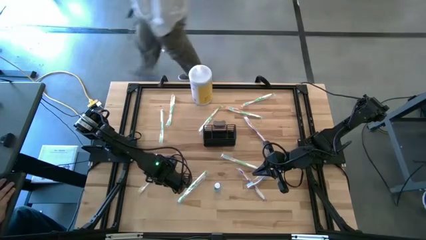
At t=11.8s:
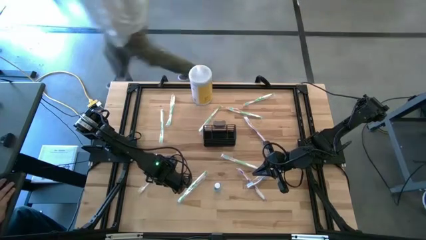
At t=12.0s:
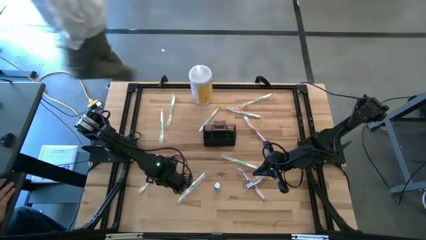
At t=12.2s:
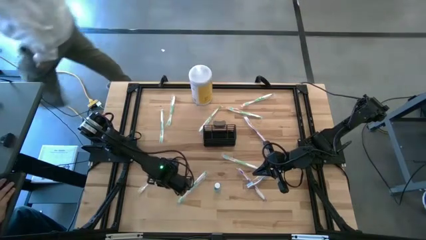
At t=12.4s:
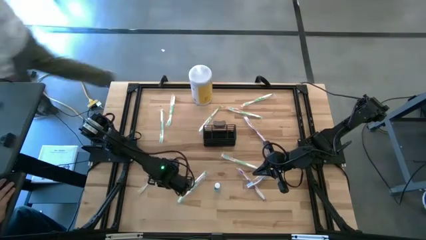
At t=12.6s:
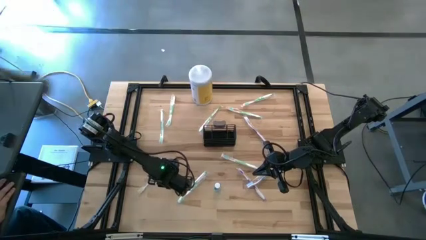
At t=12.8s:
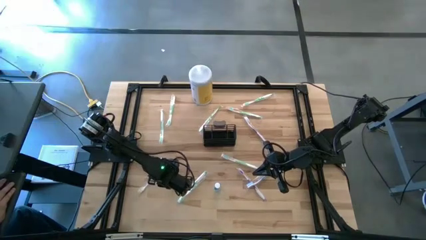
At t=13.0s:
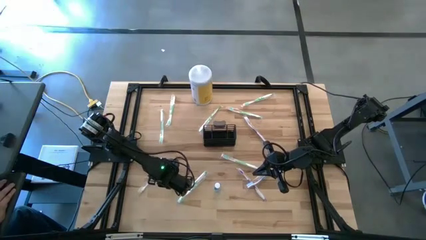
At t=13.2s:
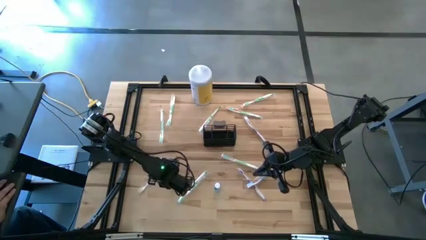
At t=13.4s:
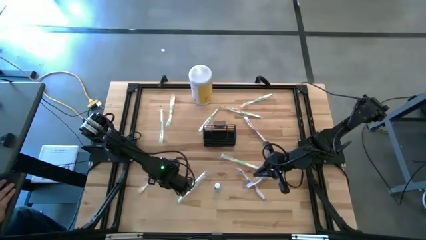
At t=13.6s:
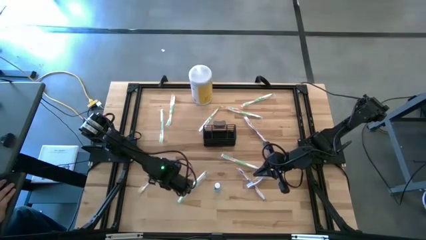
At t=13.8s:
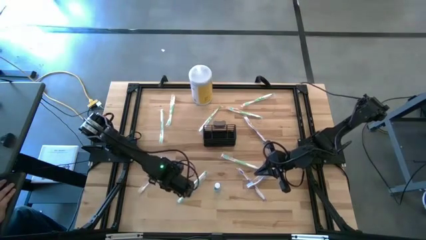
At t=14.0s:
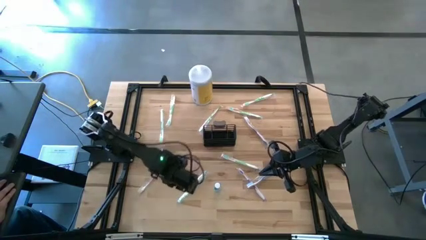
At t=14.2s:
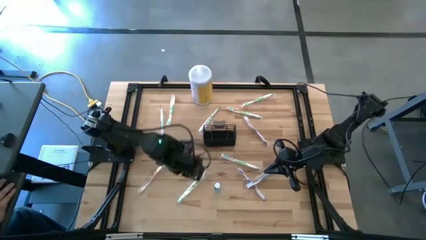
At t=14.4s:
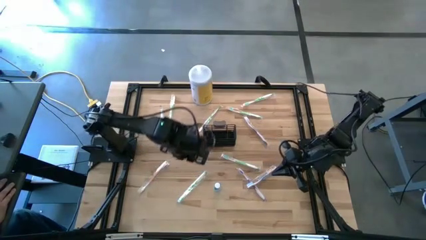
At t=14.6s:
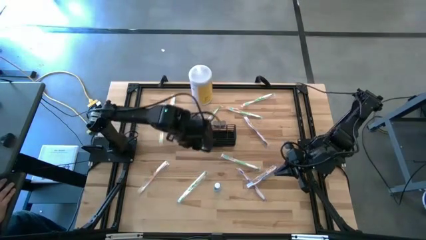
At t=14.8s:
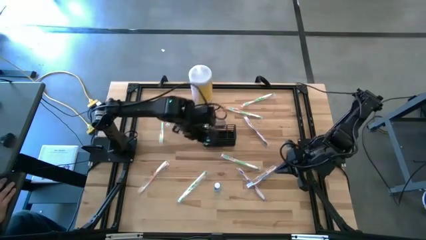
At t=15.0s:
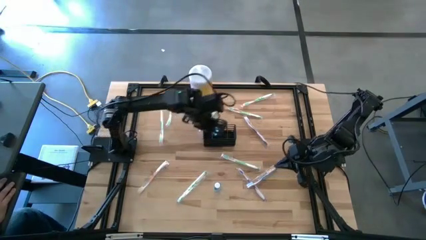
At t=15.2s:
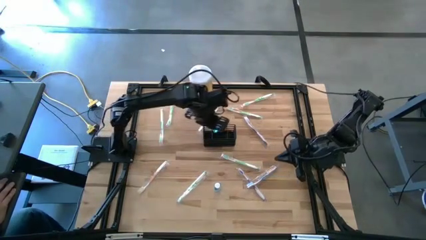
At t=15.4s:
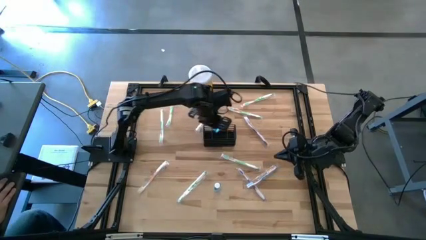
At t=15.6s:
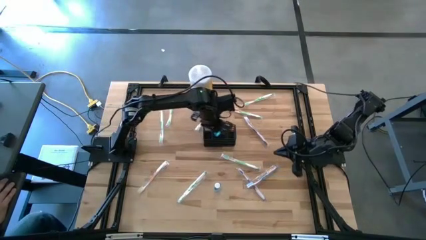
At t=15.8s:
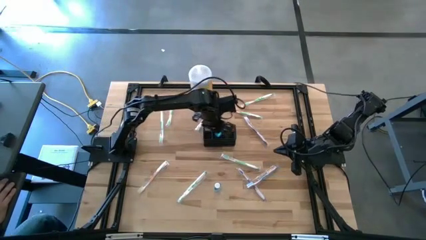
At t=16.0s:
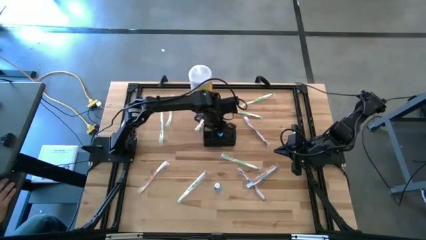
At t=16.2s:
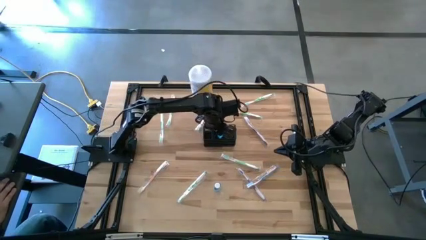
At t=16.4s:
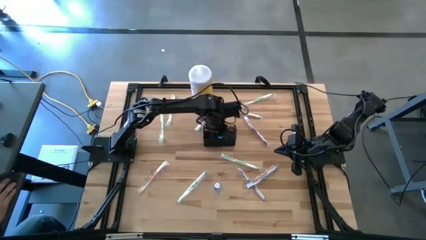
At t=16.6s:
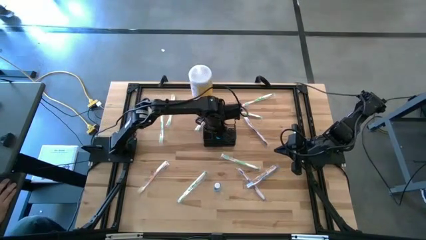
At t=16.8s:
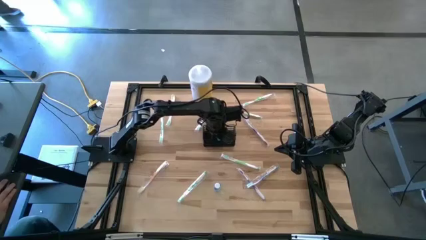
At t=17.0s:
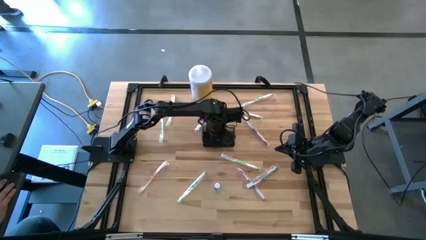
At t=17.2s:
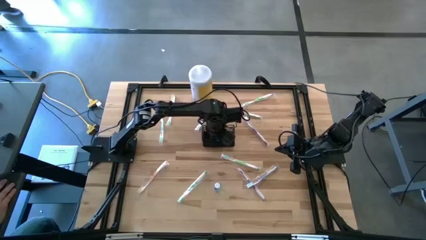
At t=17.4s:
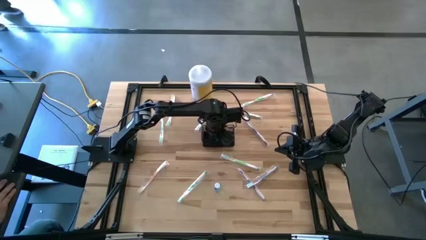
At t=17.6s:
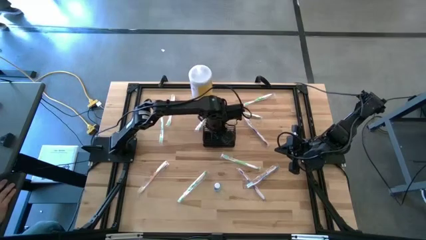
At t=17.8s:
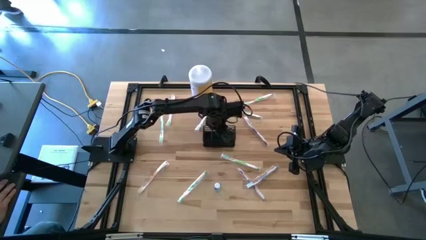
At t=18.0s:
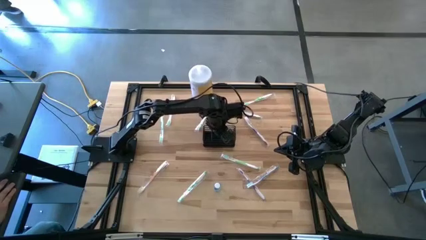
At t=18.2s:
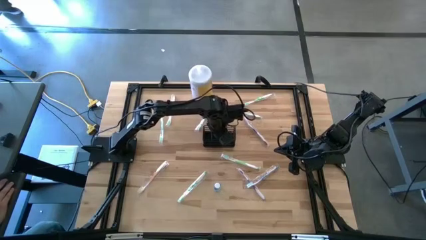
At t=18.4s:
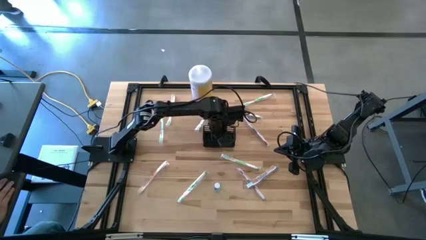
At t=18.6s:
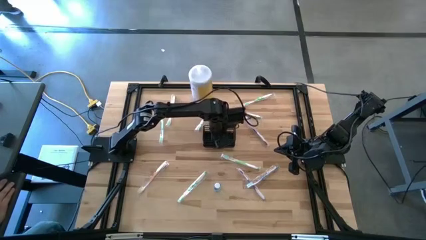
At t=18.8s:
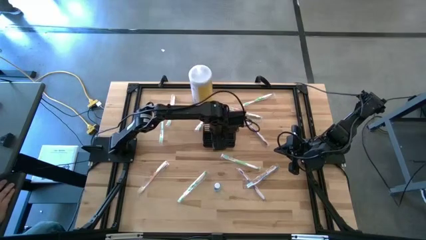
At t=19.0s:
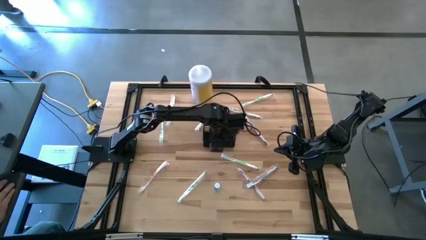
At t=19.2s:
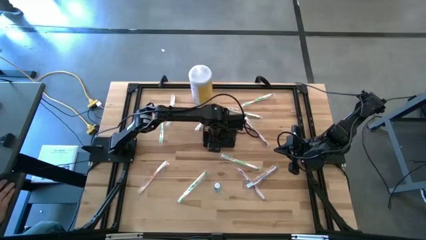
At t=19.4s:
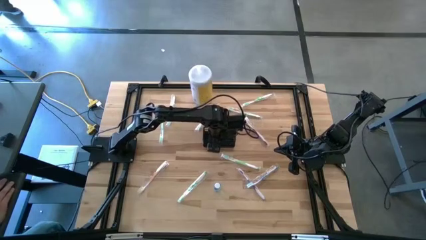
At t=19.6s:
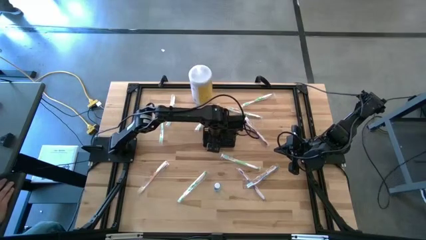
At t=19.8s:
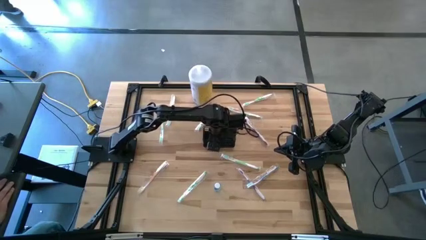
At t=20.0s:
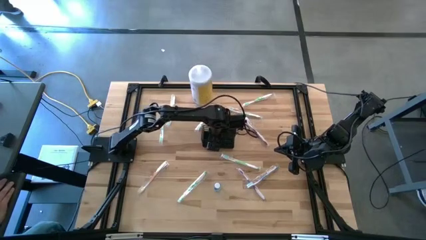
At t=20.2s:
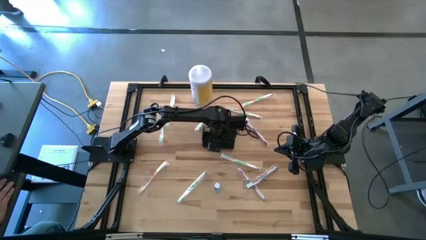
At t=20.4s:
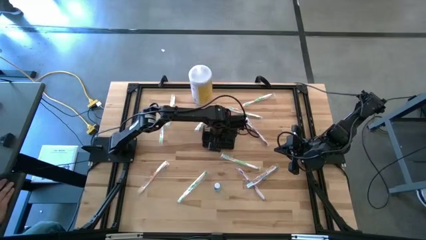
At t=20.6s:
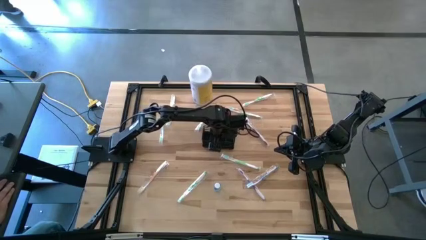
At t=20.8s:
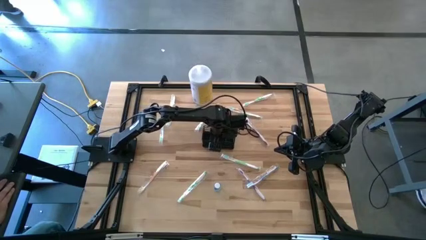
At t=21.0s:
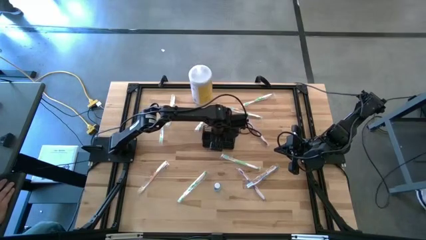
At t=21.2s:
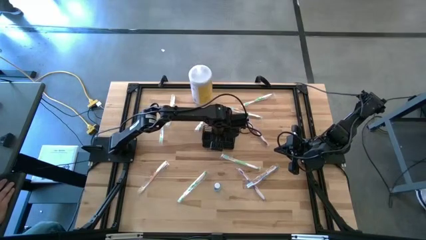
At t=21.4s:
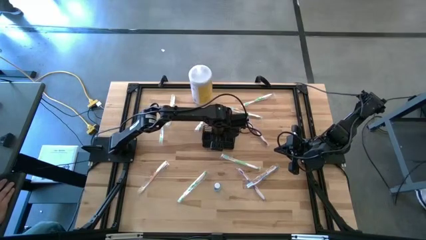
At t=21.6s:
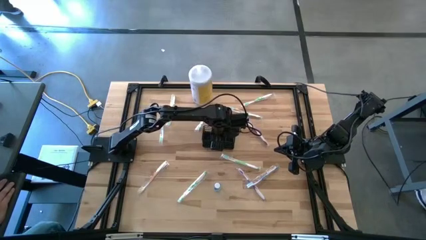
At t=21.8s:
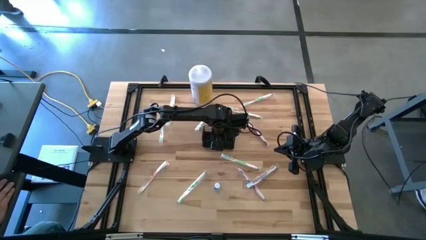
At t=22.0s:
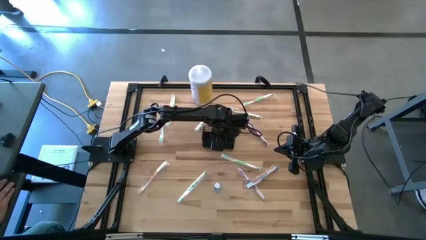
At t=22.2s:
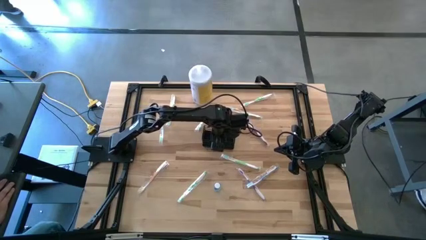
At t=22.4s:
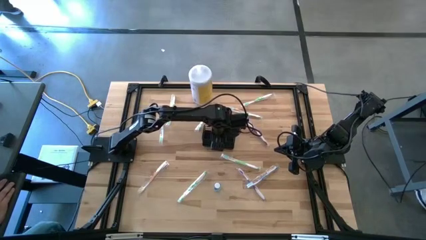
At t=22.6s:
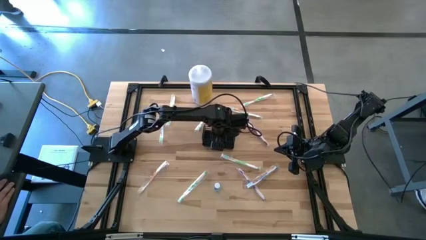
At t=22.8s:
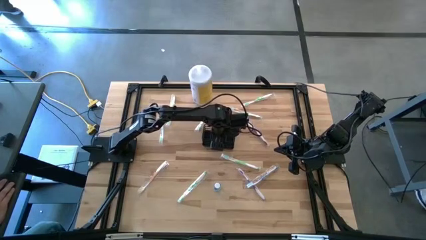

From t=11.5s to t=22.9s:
Task: Pick & Place toothbrushing station
Put the left mouthwash into the middle section wire organizer
